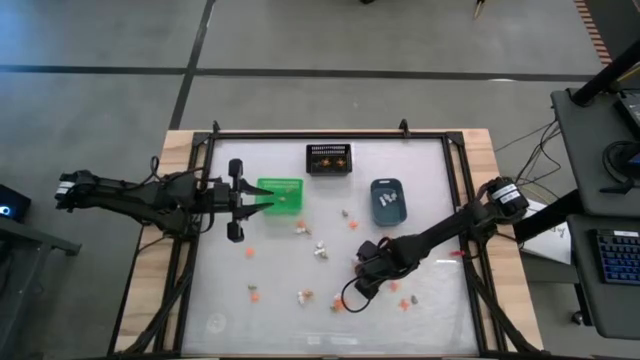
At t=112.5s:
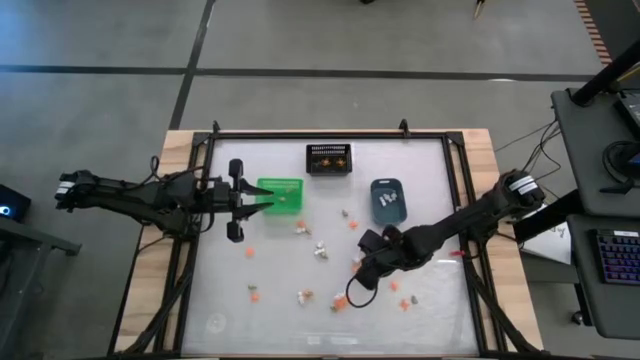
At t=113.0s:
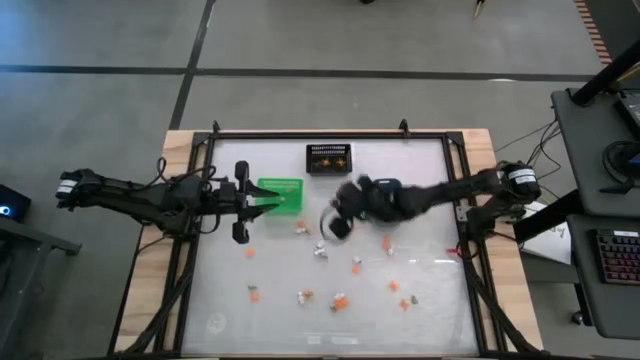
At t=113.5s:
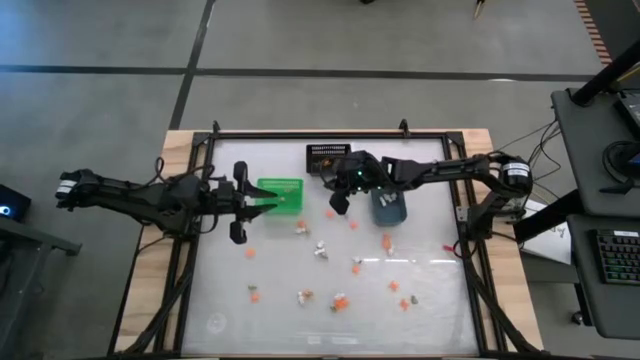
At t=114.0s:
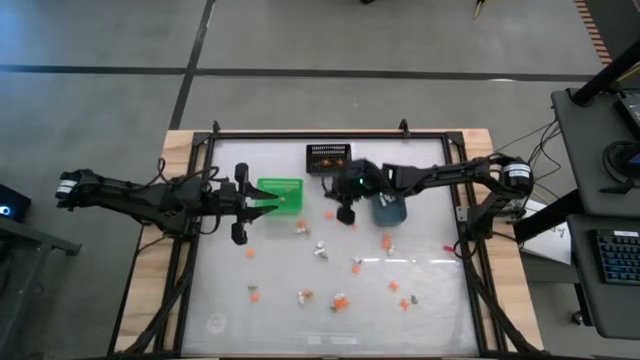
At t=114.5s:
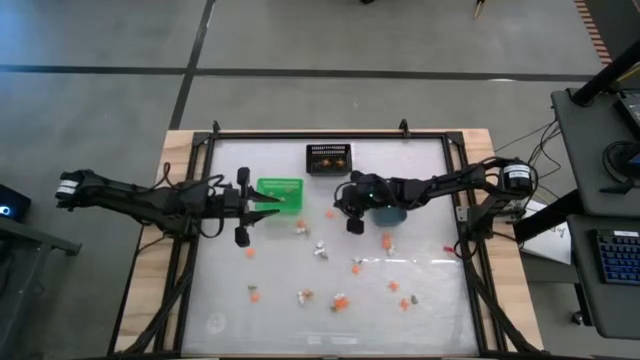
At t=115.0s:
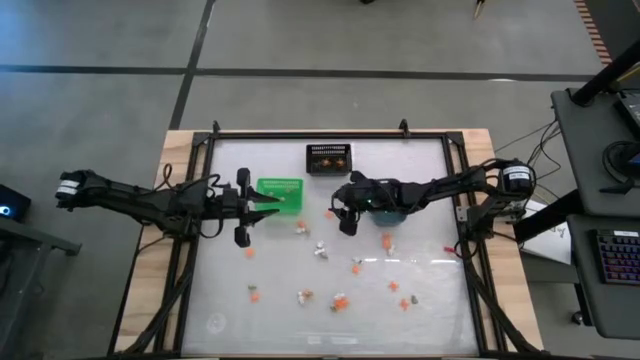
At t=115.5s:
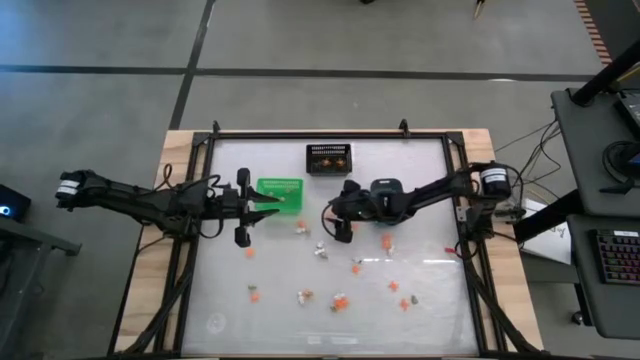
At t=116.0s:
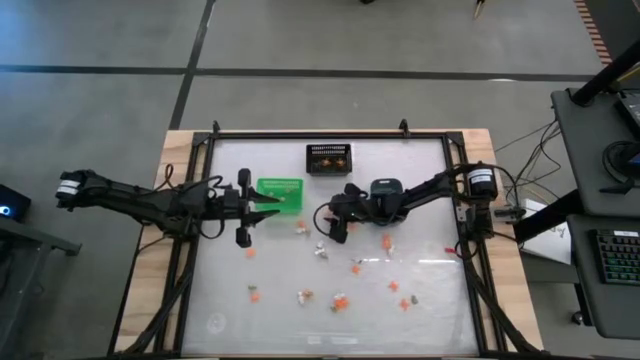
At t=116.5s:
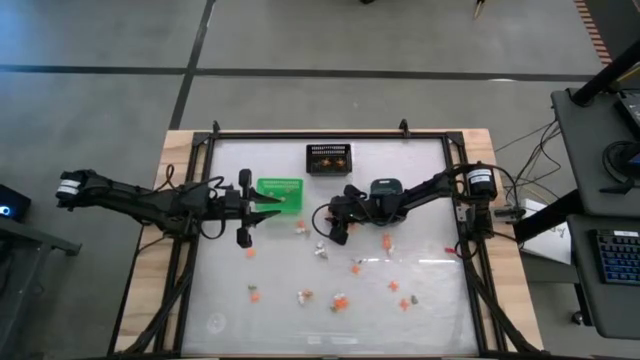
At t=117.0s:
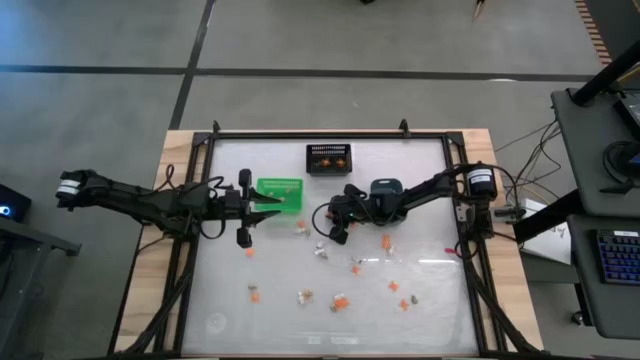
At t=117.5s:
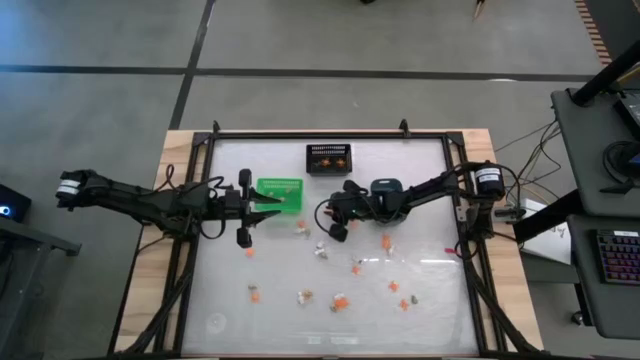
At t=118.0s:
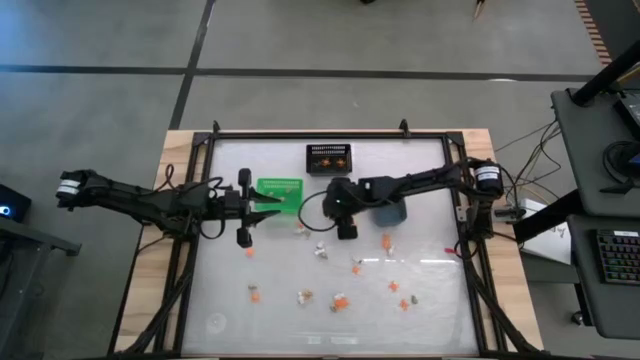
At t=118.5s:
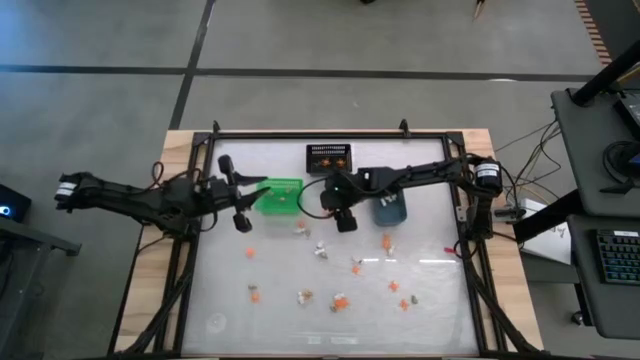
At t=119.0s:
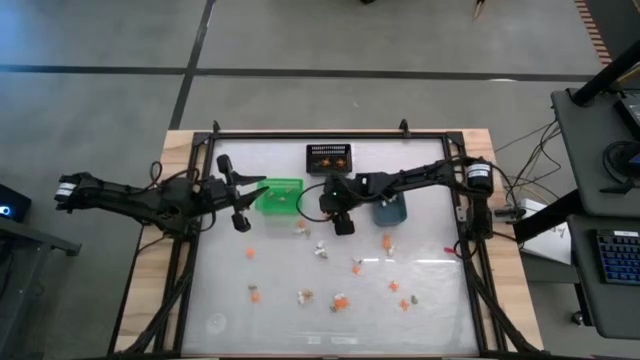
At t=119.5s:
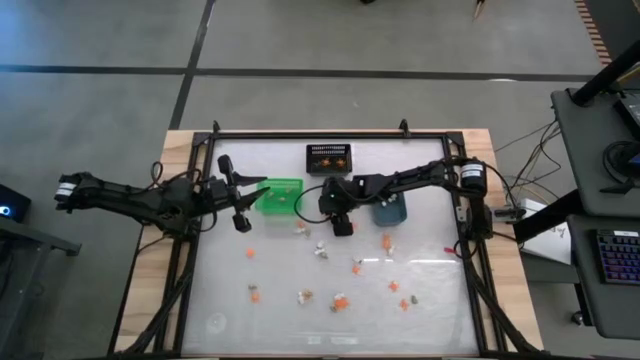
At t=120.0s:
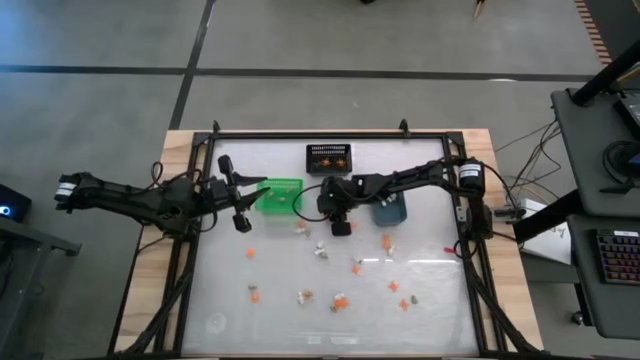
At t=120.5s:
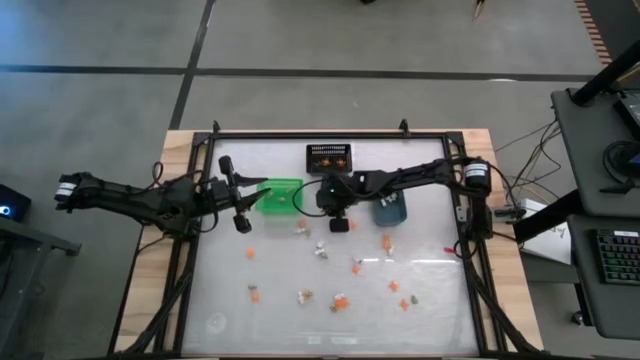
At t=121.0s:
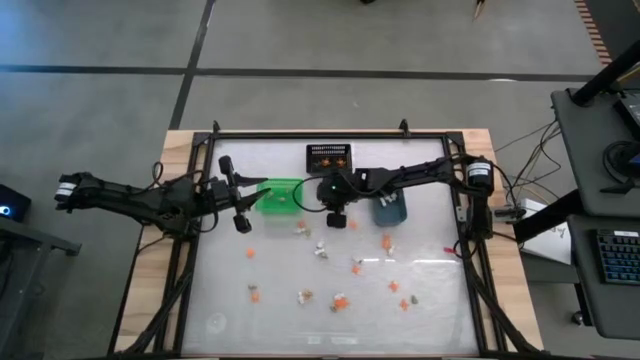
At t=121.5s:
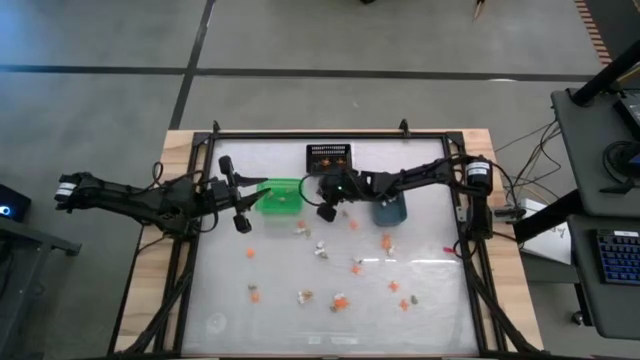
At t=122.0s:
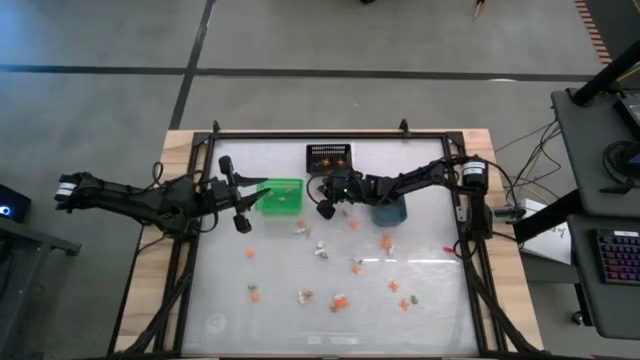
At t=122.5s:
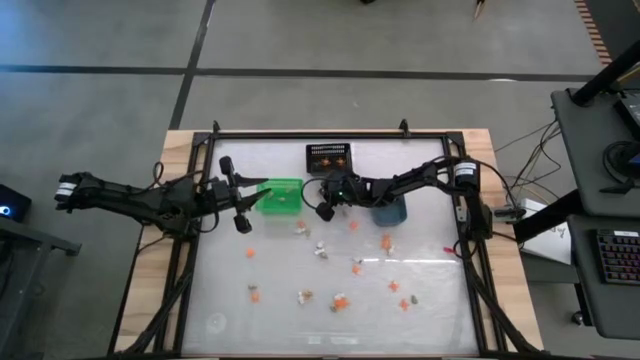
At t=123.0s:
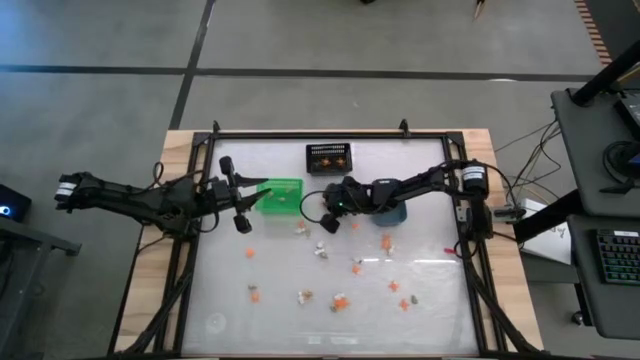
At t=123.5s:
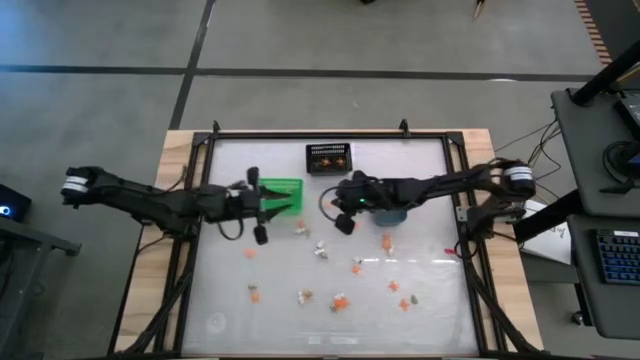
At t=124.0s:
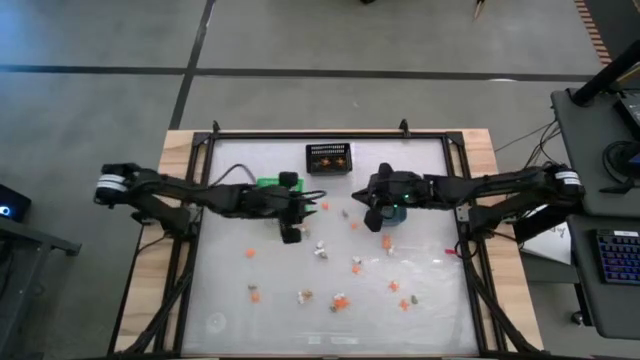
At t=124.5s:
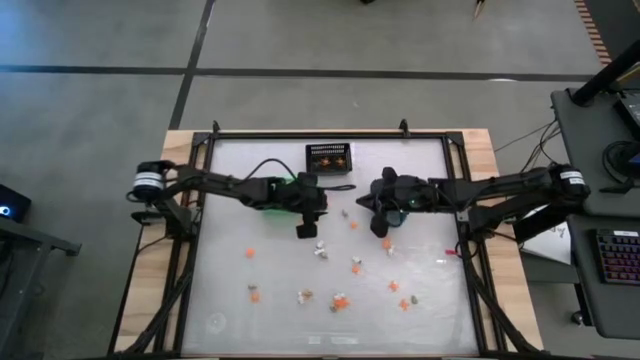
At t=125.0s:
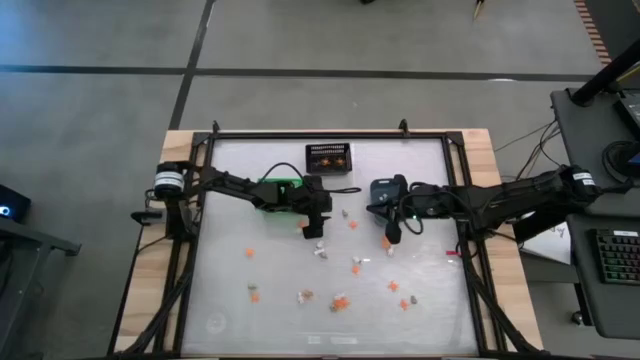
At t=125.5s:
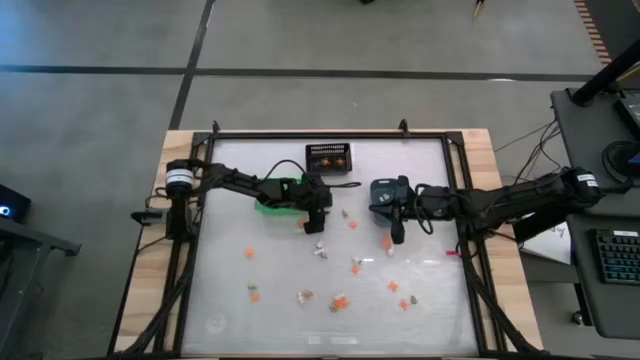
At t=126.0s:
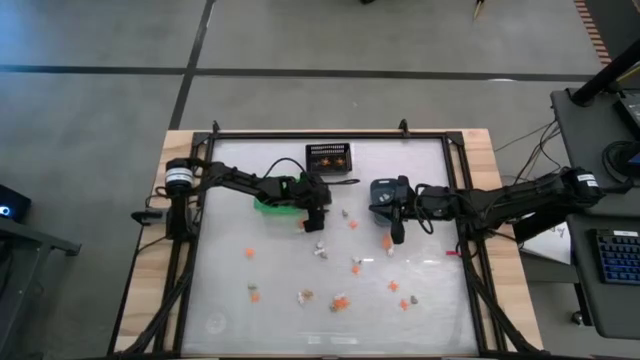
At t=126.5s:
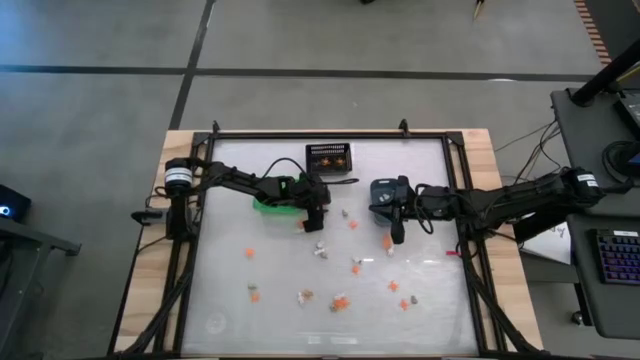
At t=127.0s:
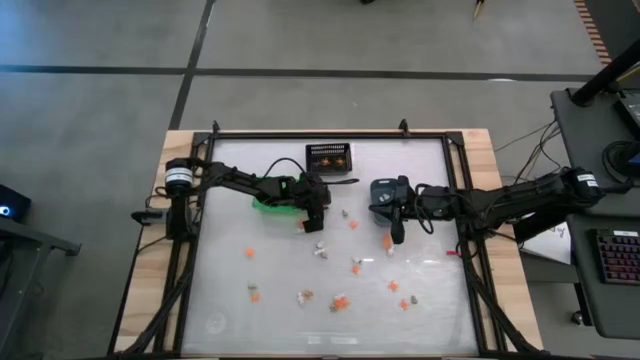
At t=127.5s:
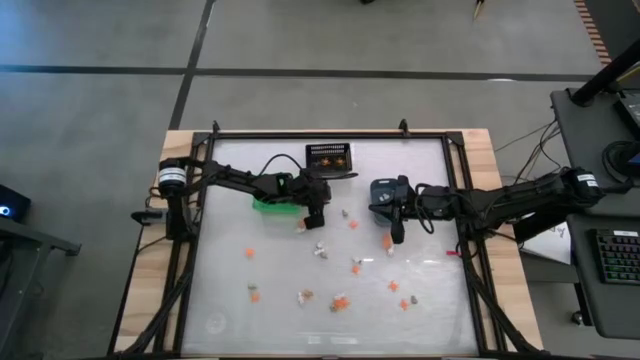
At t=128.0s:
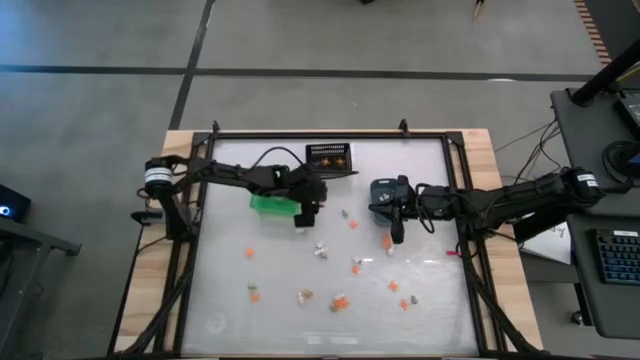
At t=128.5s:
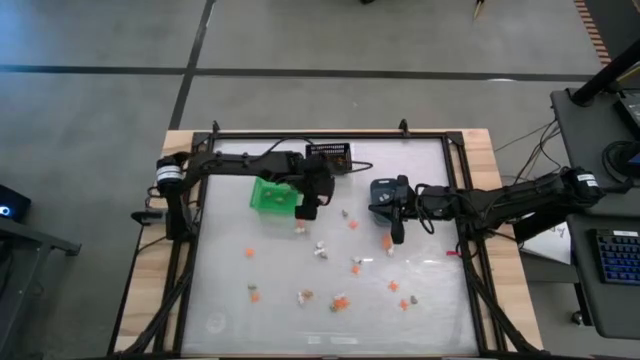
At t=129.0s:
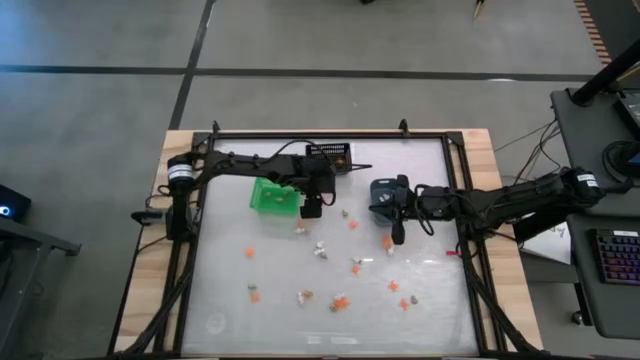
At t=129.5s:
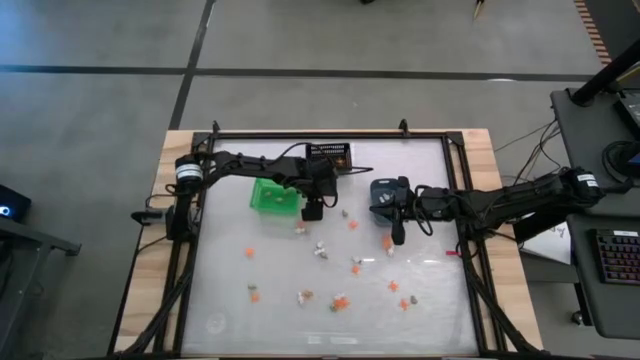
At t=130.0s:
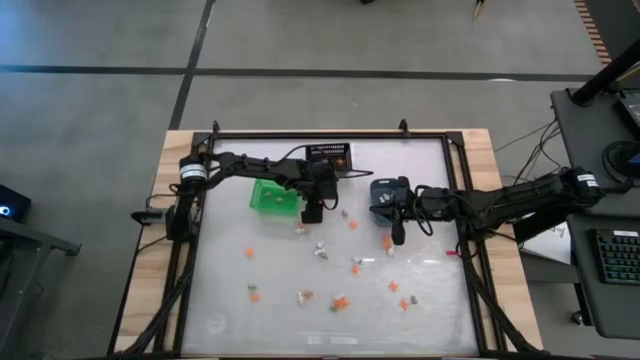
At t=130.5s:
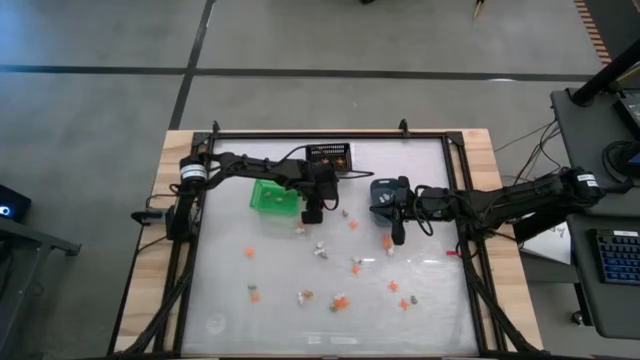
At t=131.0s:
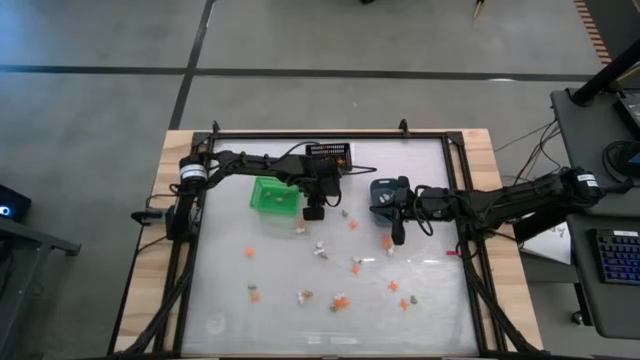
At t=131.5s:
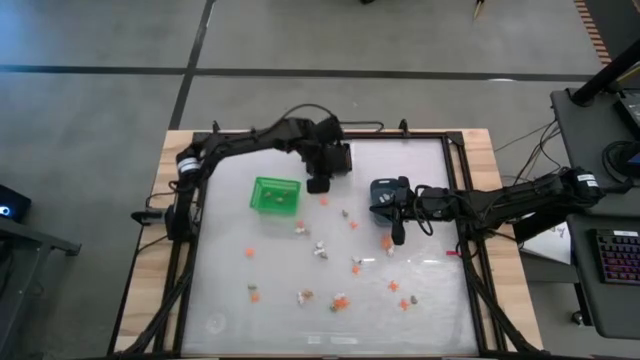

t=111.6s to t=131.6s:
Task: Sort Halloween decoration
Put the orange spider toy into the black bin

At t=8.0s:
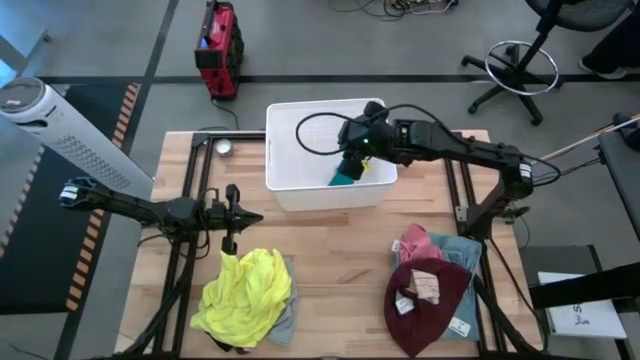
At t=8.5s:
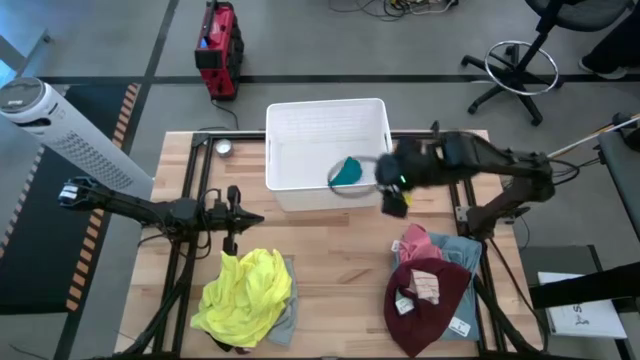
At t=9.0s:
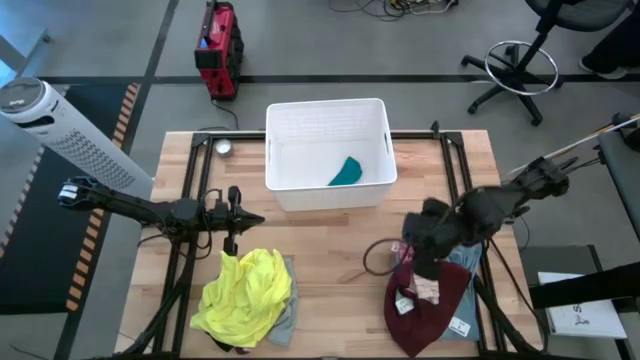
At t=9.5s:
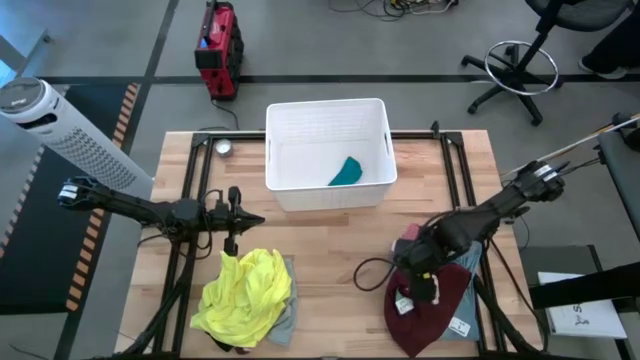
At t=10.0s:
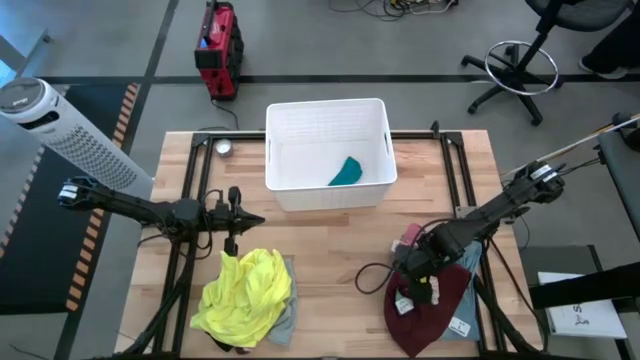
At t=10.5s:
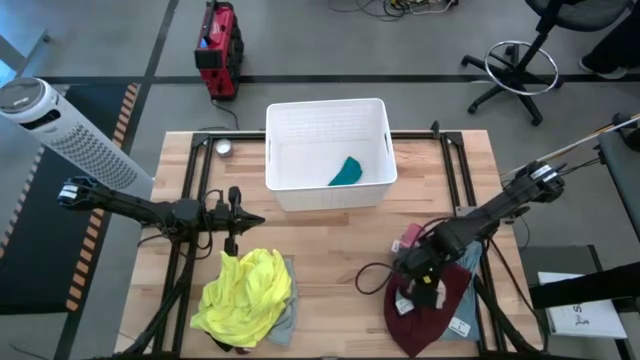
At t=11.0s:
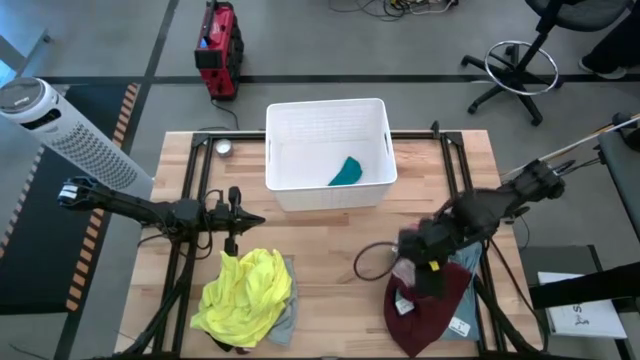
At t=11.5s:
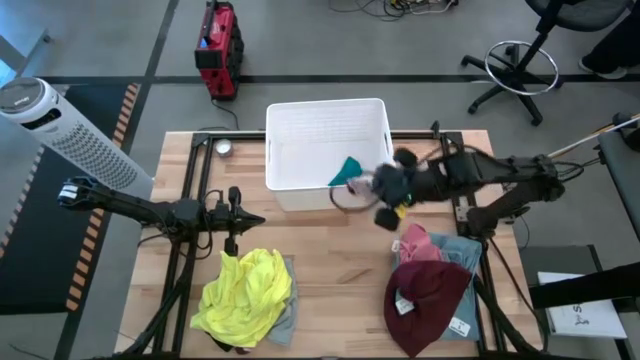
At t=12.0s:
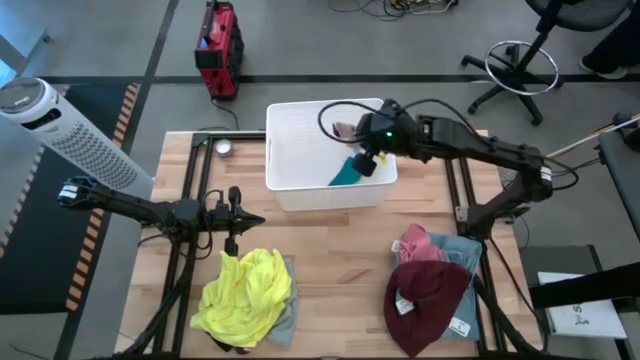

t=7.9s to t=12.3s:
Task: Sort clothes
Put the striped sock into the white laundry bin
